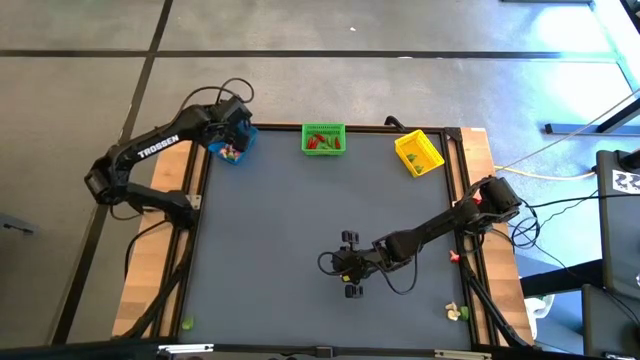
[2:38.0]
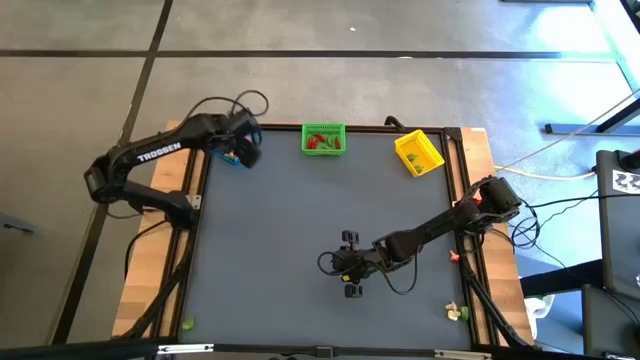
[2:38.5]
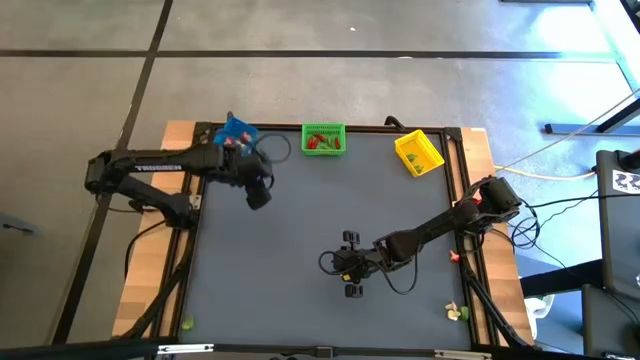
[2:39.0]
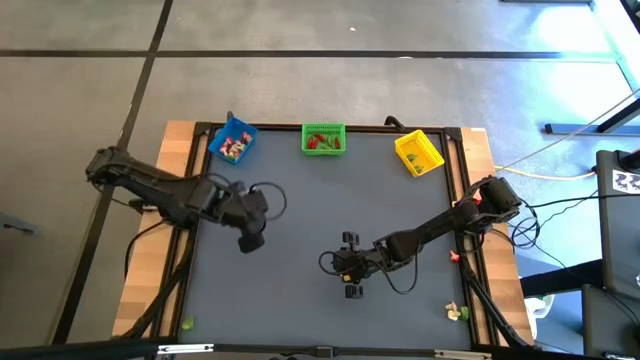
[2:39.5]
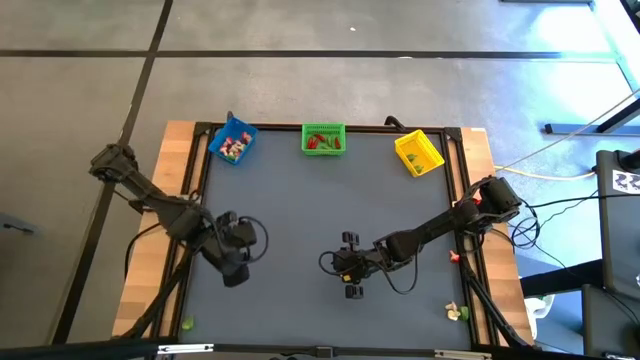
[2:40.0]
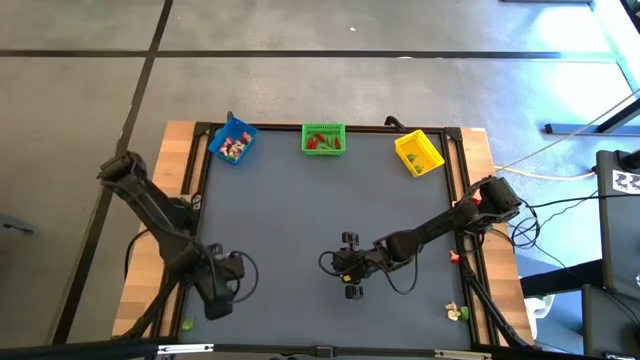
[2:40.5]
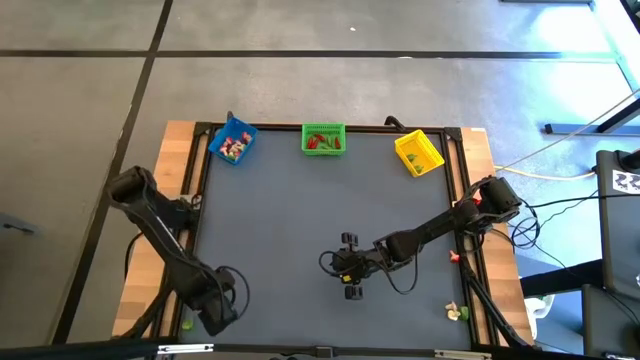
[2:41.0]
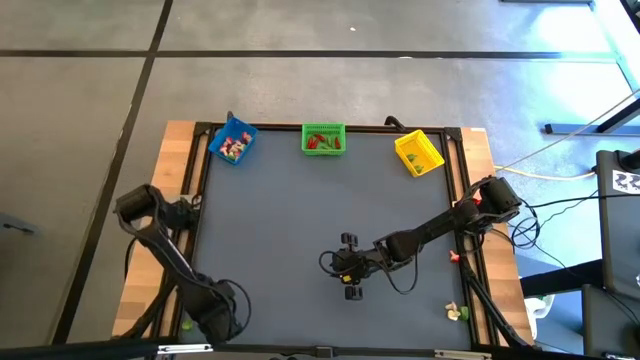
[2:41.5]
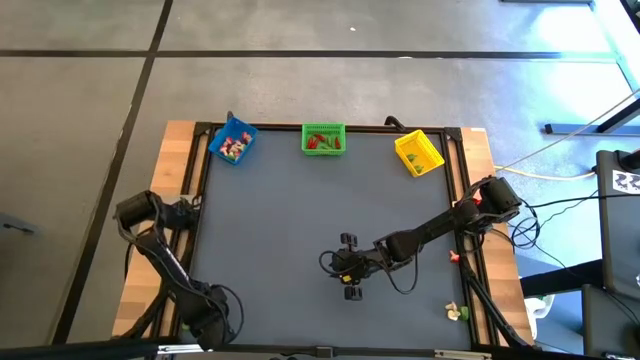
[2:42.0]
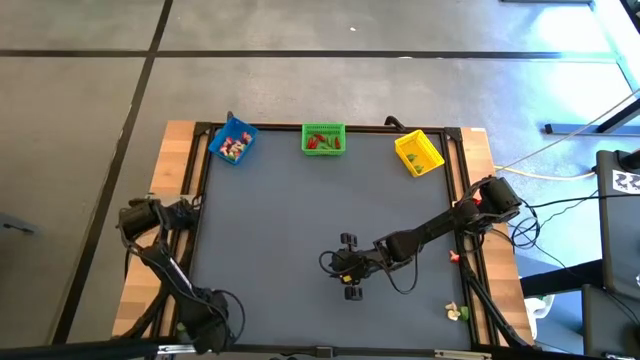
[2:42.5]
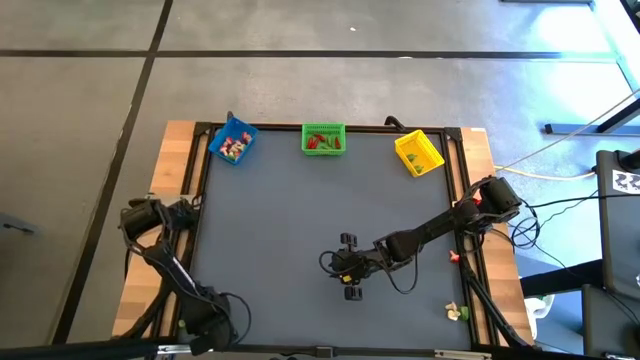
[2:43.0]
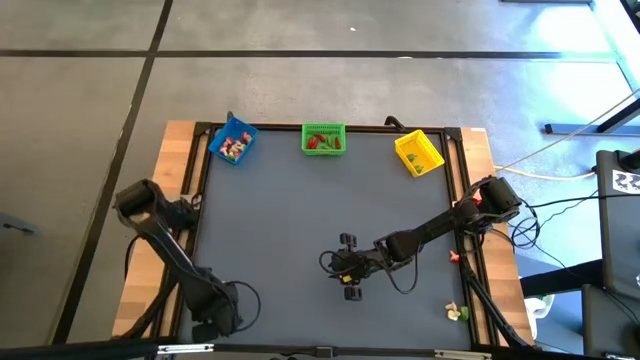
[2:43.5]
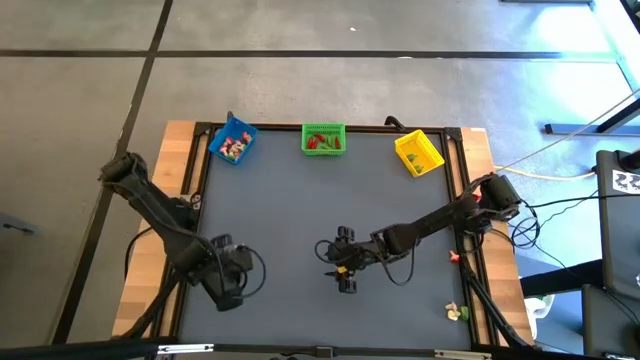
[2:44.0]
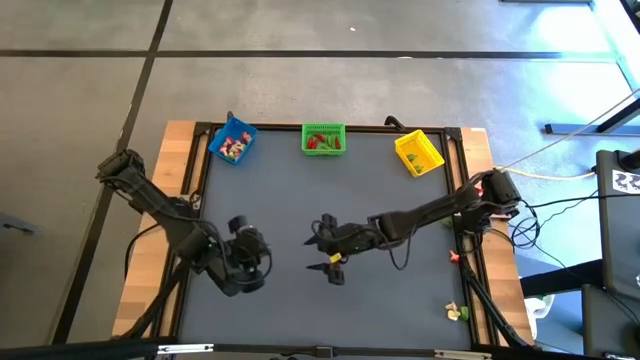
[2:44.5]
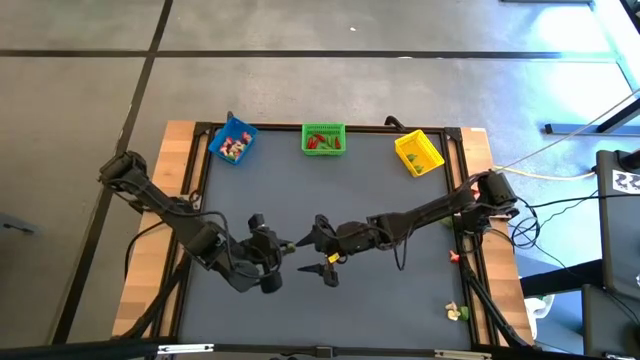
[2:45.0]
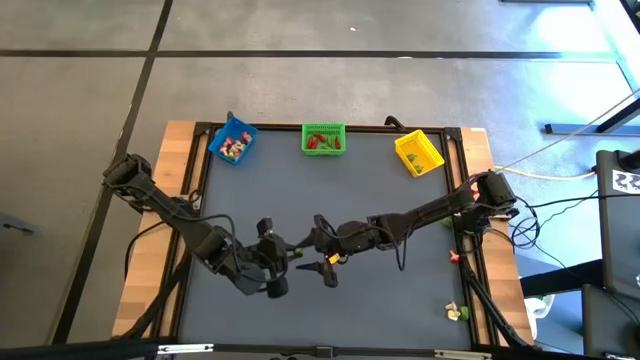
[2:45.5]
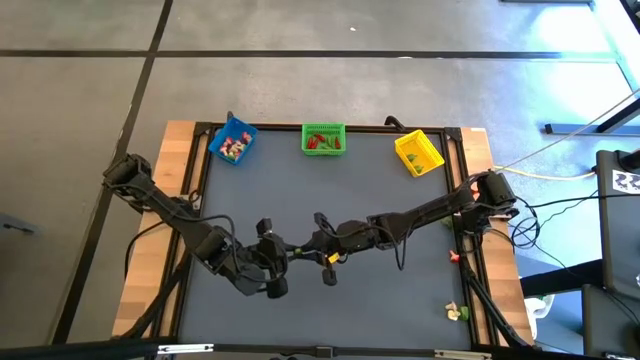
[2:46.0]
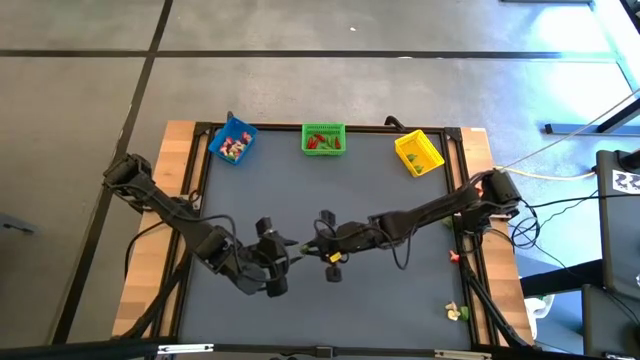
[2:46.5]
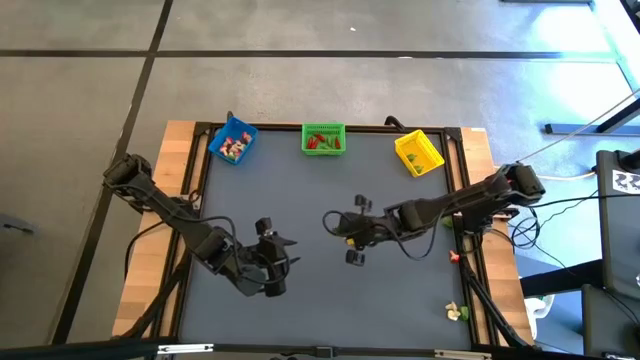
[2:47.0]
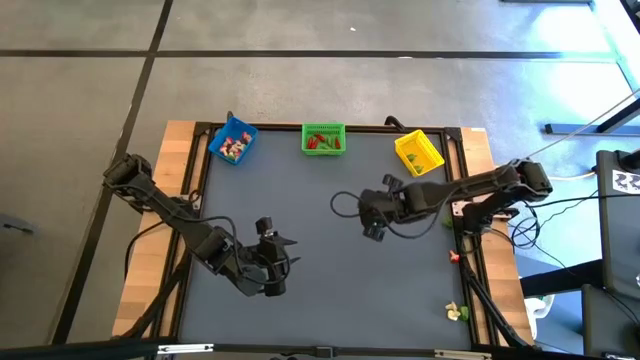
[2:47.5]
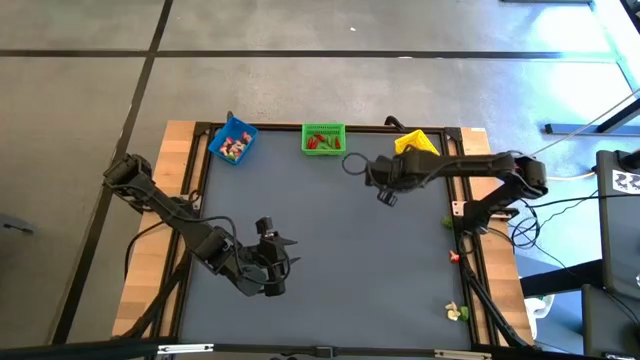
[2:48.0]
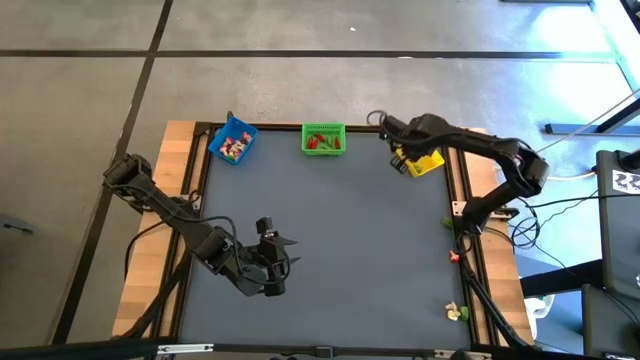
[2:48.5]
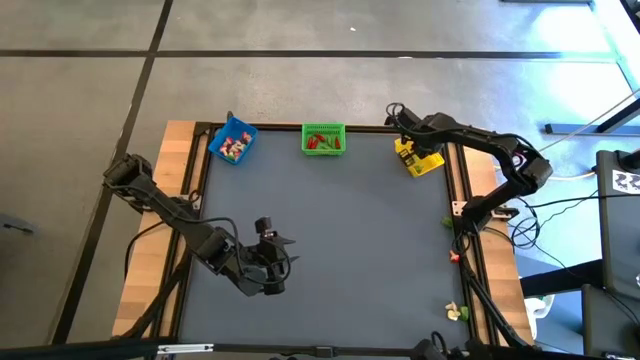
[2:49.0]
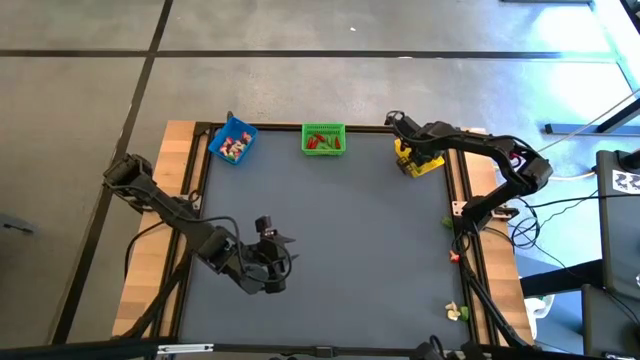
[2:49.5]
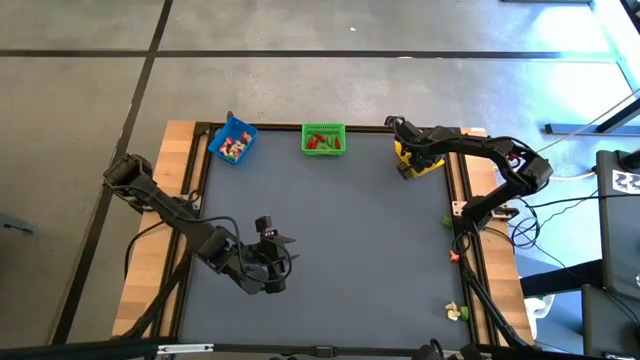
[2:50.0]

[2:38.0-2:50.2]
Task: Sort produce into baskets
Put the green chili pepper into the yellow bin

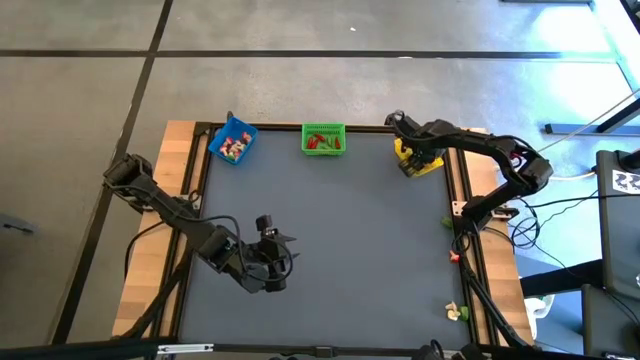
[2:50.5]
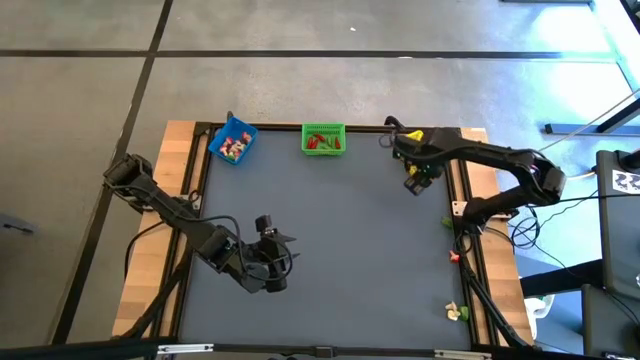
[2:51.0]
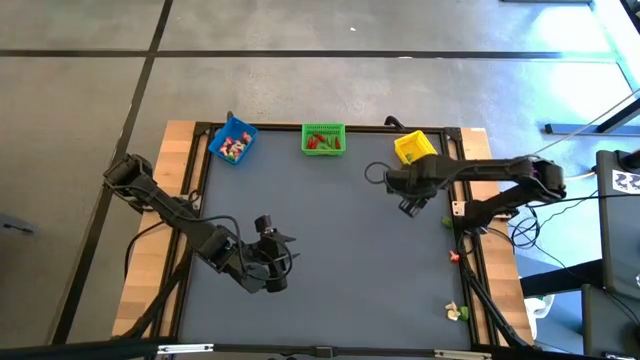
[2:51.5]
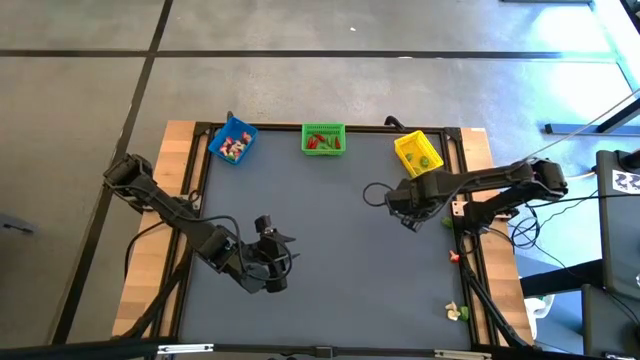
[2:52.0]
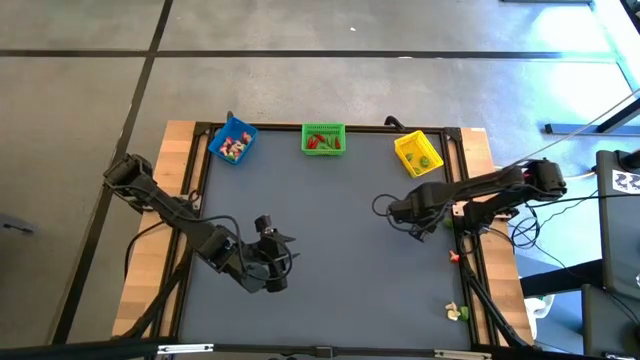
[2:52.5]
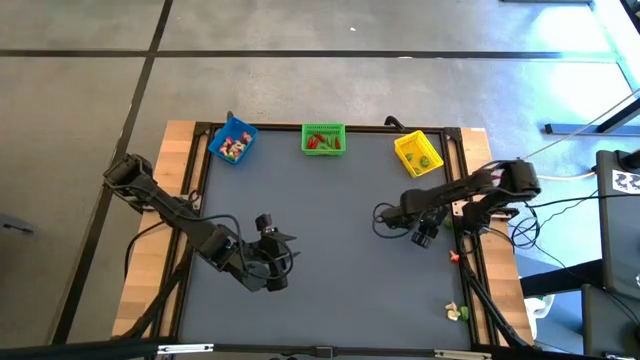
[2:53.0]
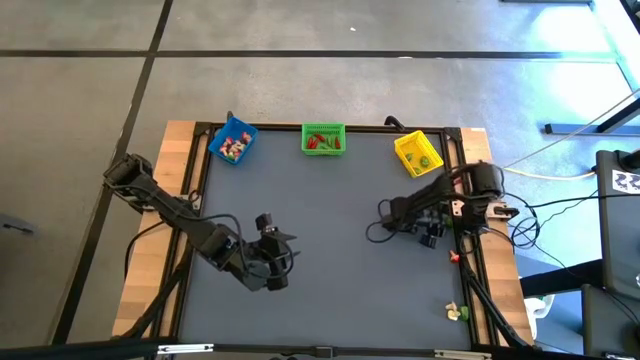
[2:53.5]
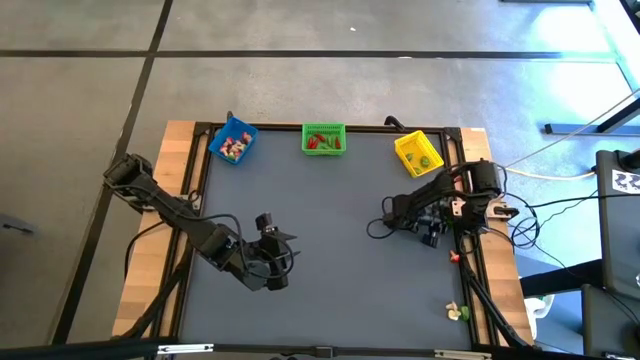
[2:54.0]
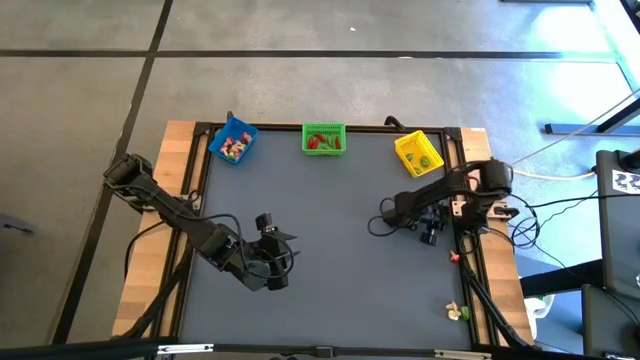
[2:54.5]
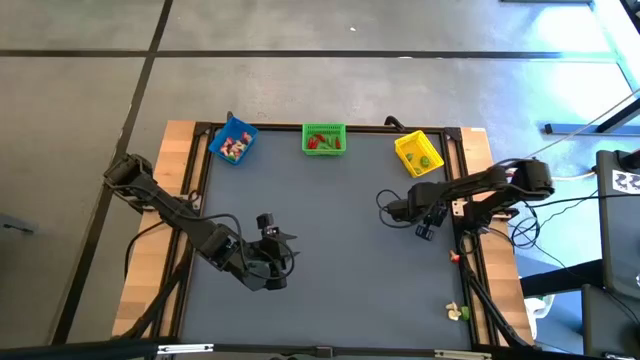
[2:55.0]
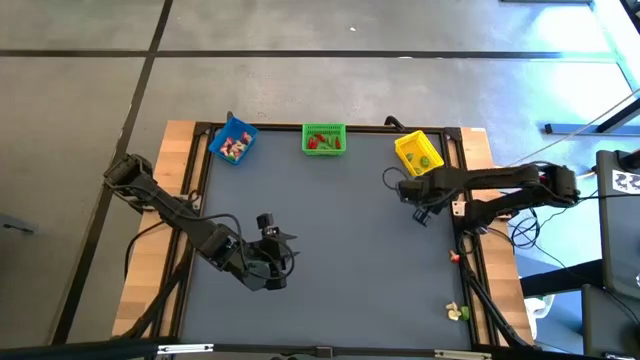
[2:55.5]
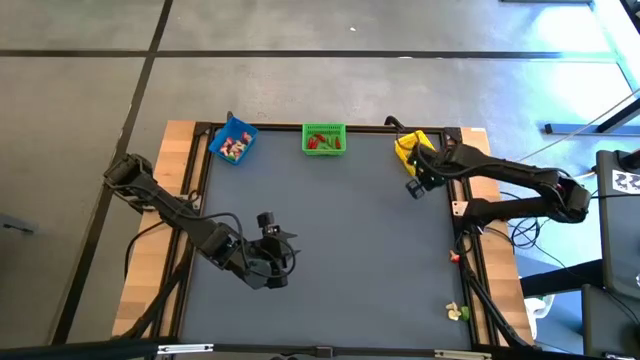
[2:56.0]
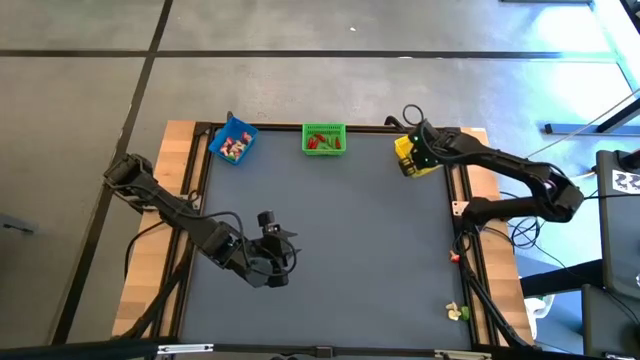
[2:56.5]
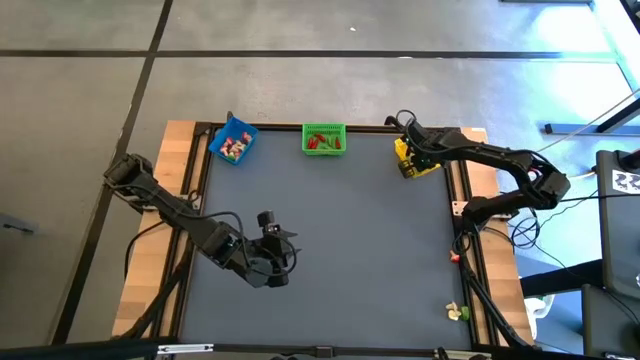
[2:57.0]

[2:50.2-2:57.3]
Put the green chili pepper into the yellow bin
